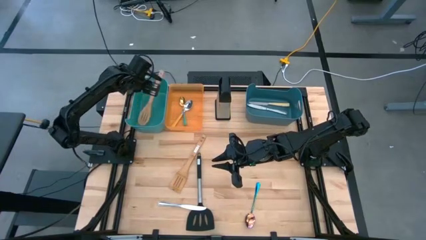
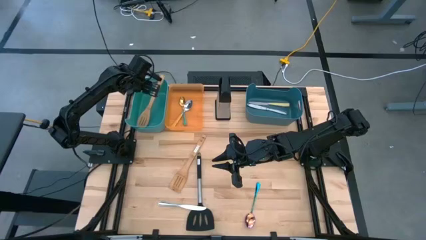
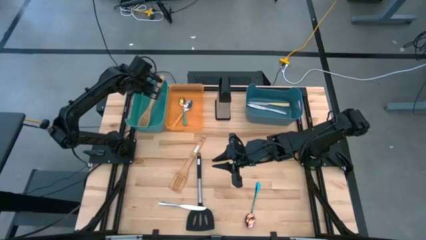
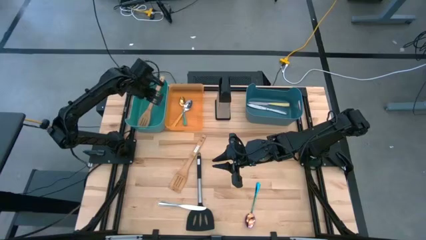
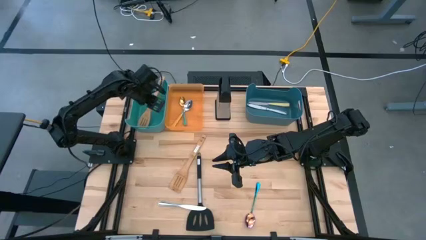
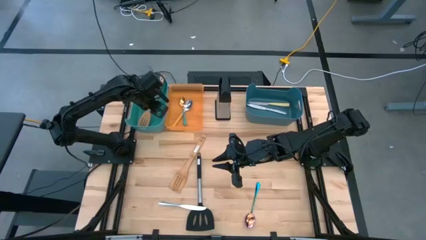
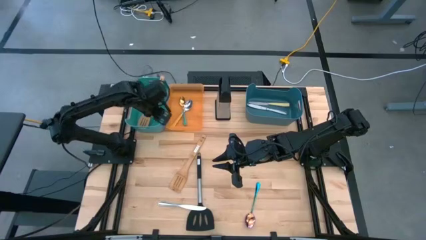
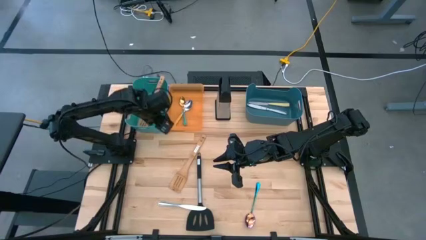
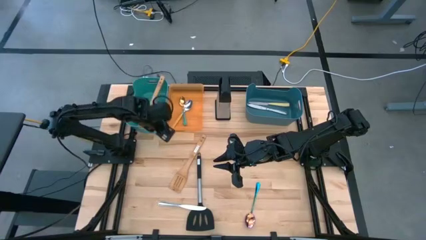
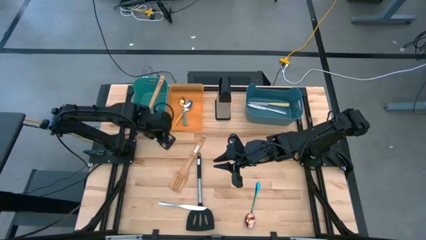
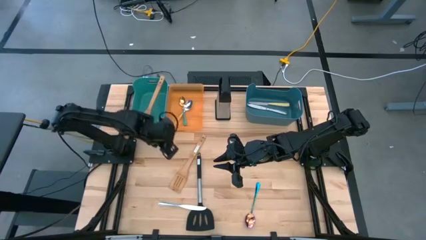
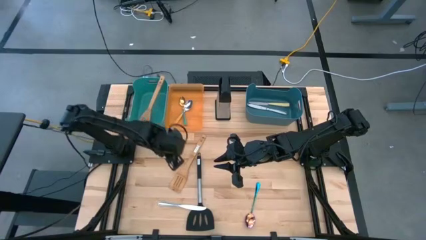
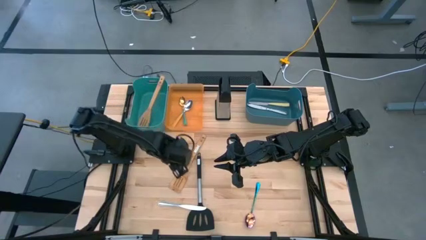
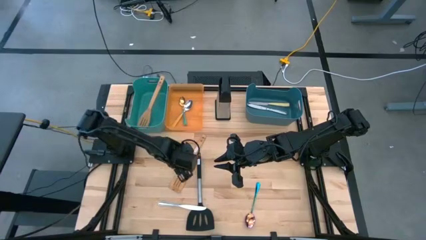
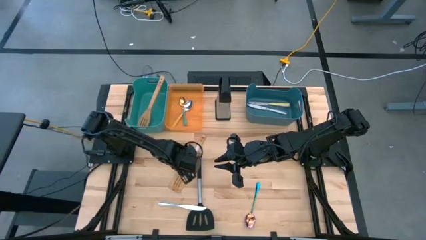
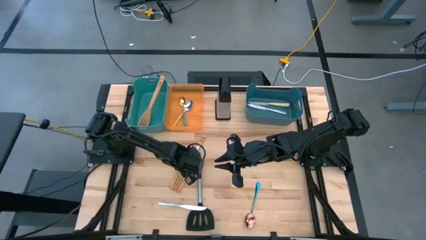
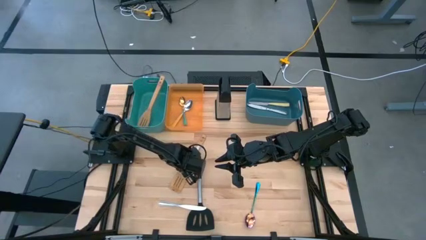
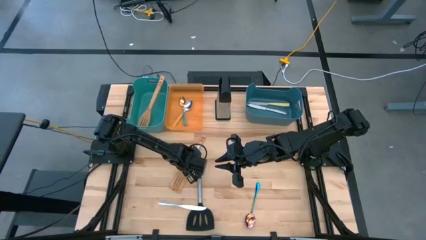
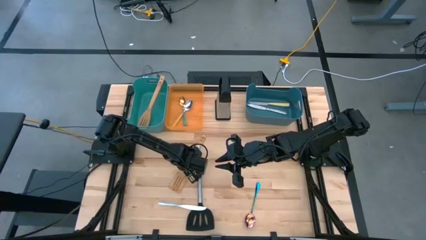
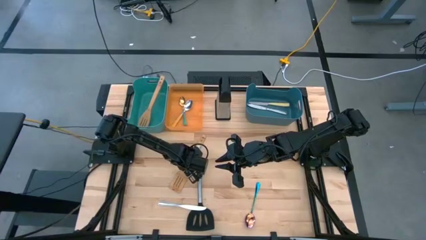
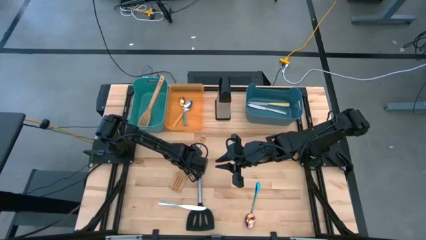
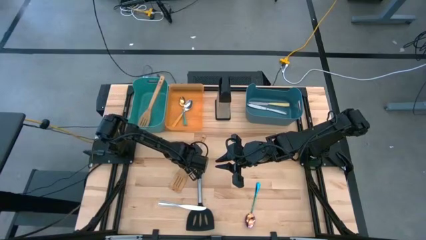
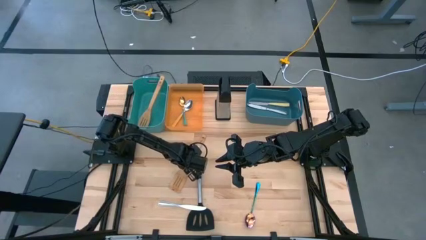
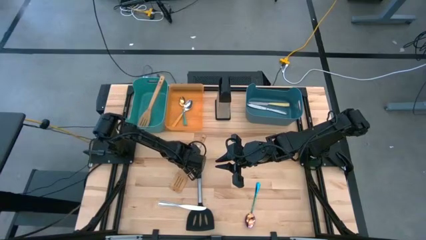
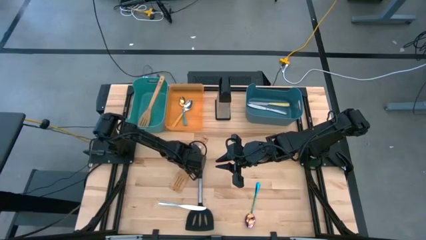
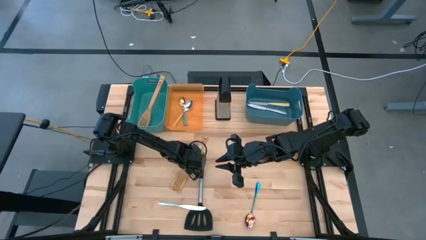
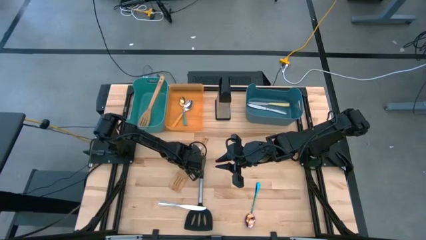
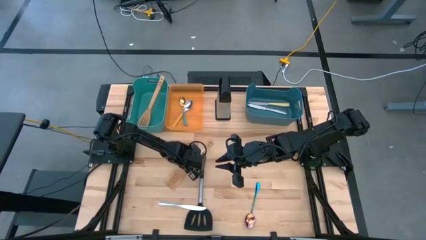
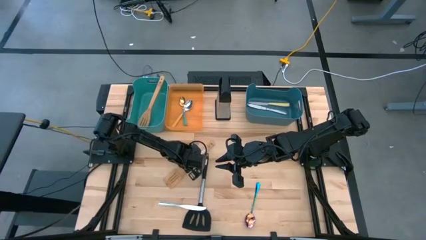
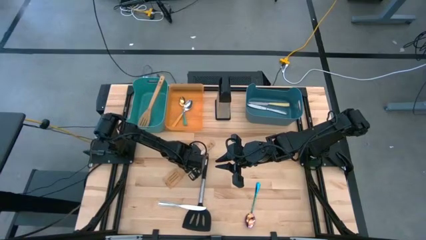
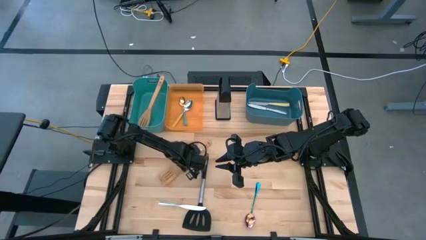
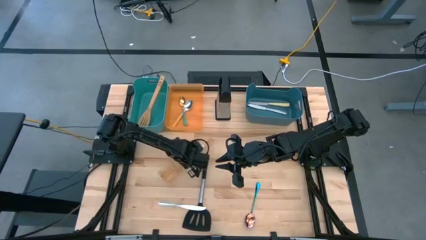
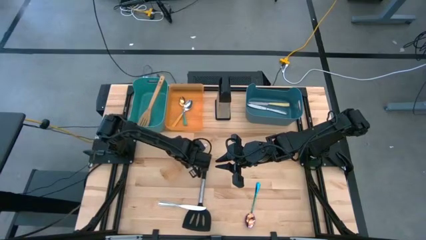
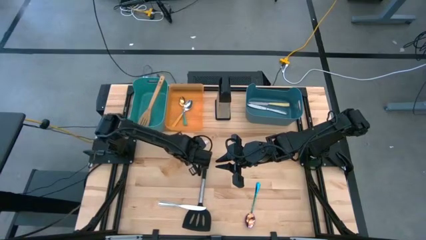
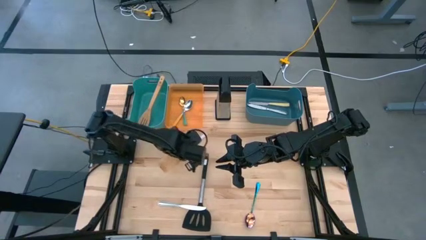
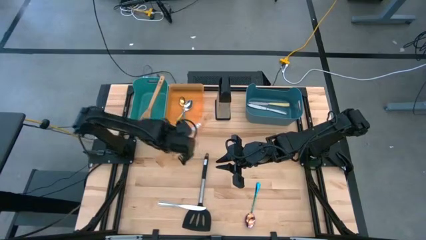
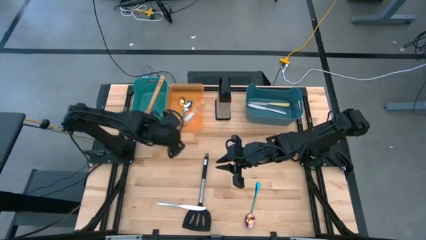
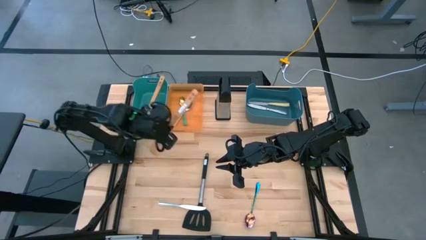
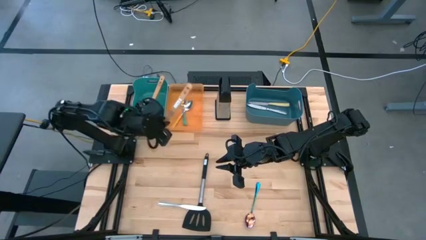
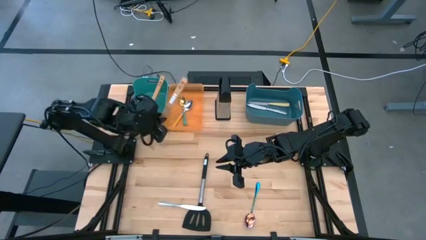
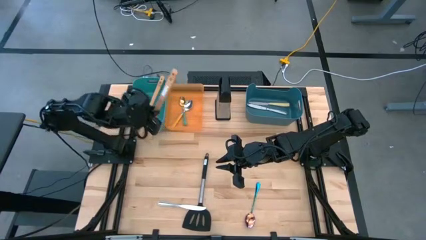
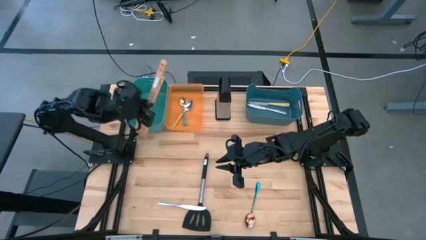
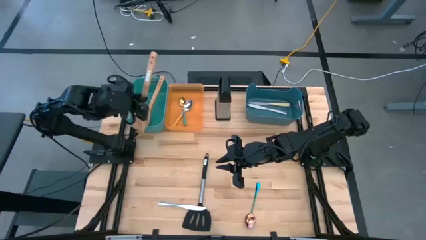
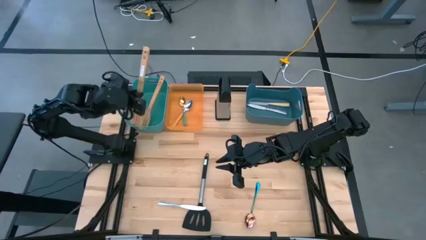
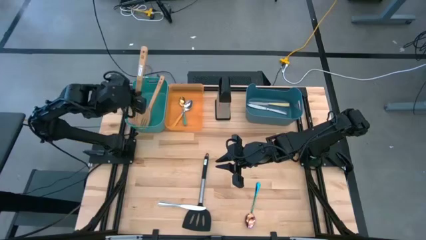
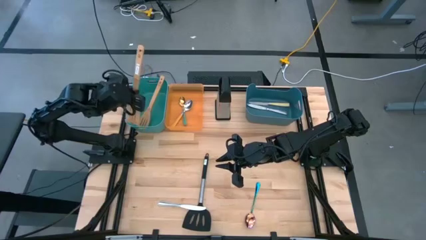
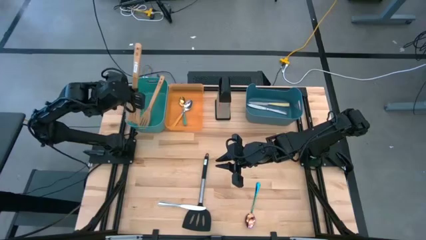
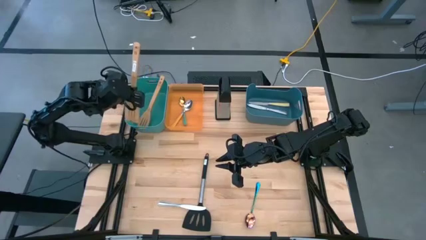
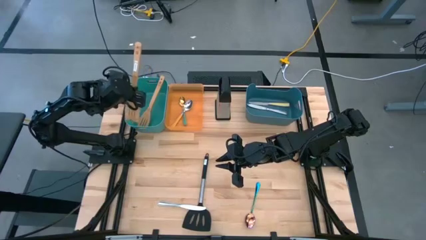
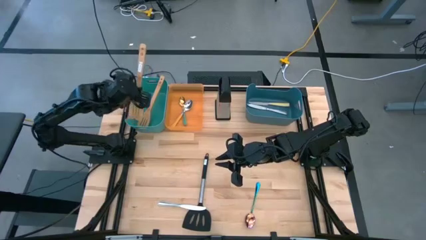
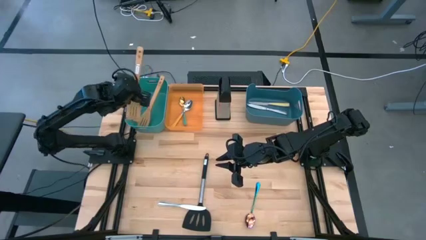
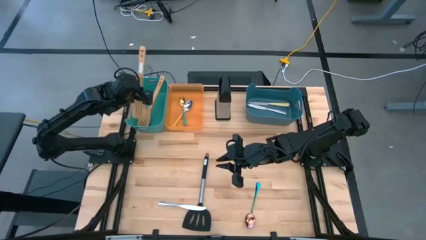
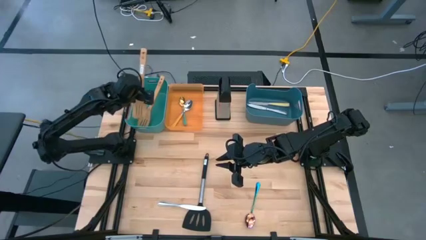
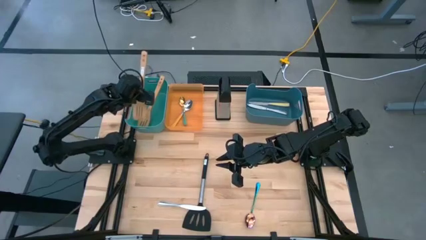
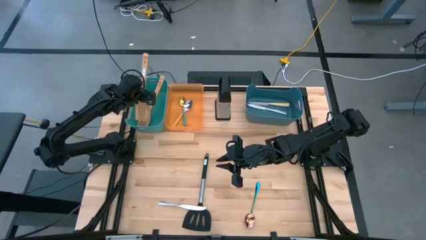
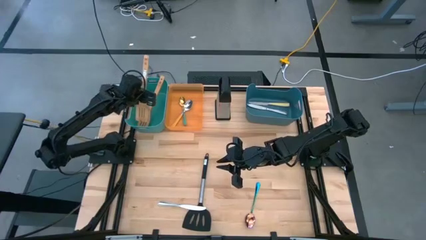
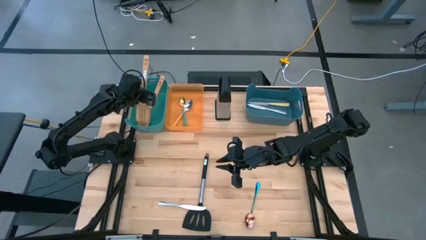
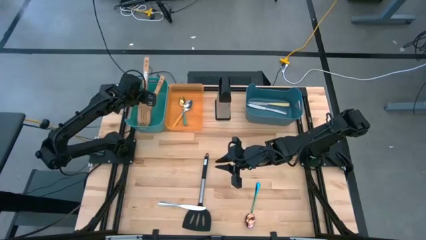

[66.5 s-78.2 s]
Task: Pick & Place Kitchen Items
Put the brown spatula into the green bin

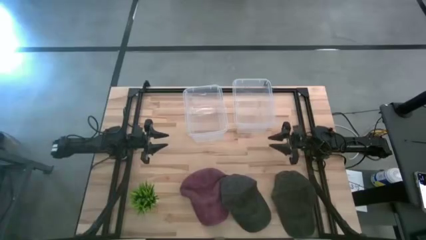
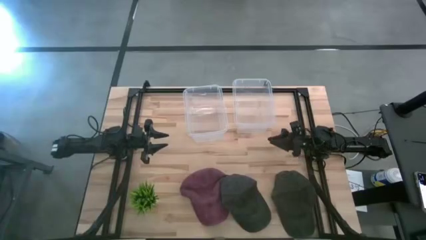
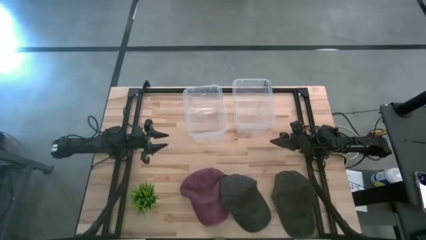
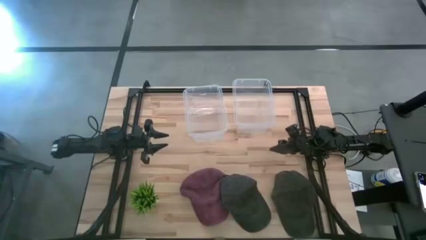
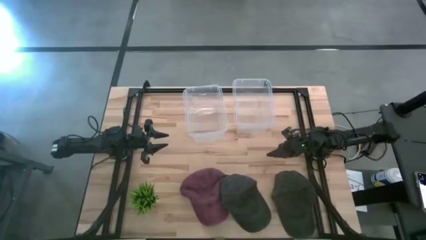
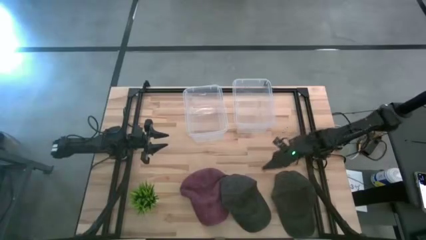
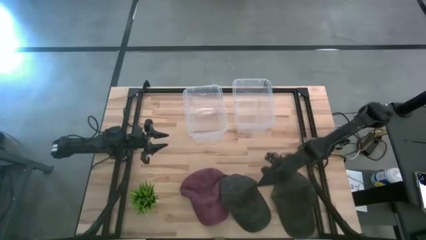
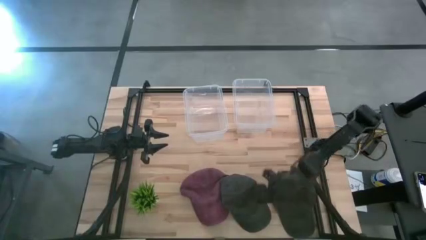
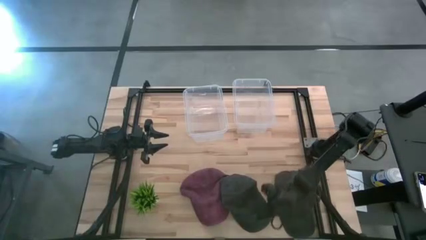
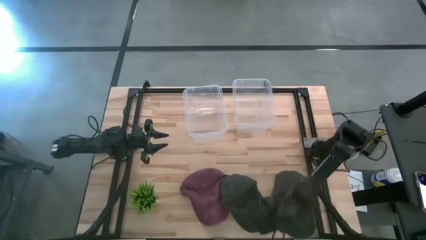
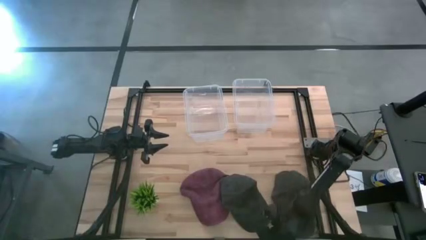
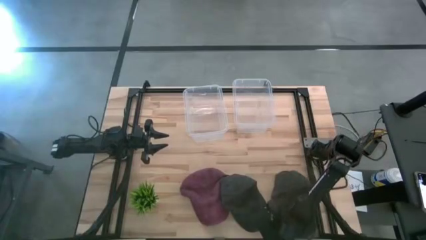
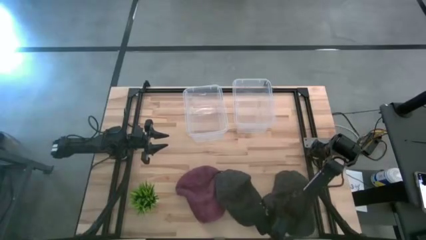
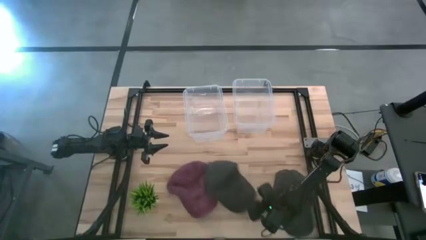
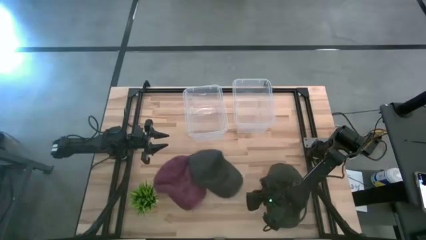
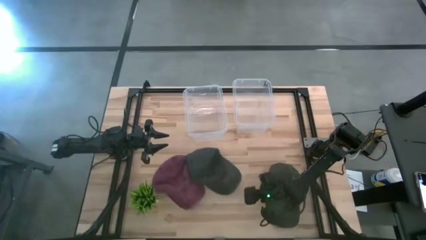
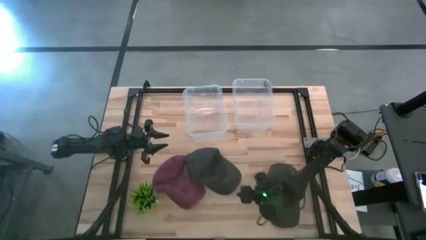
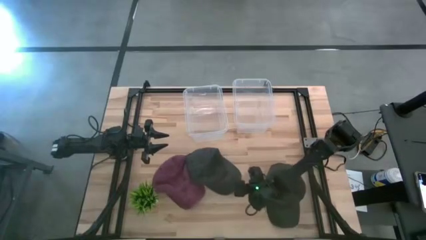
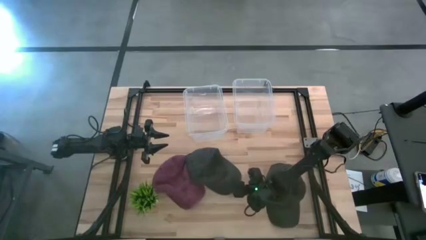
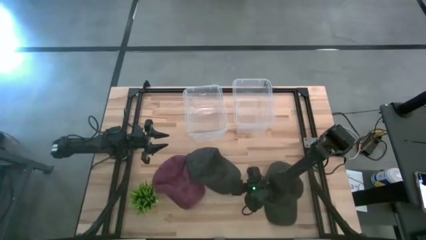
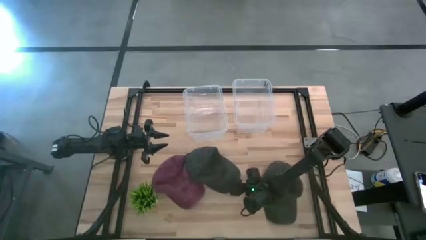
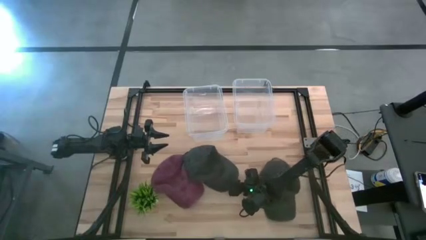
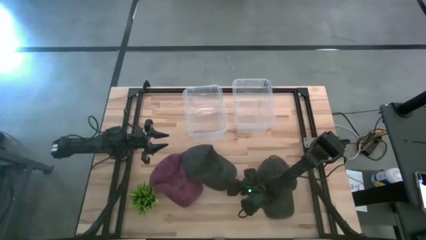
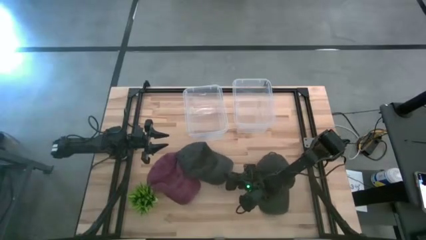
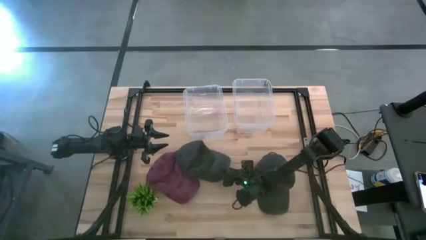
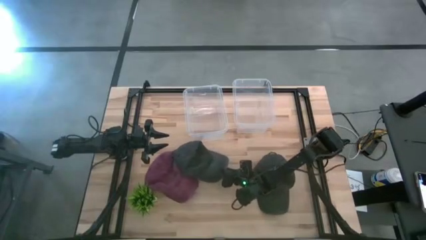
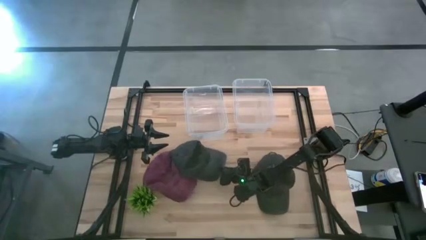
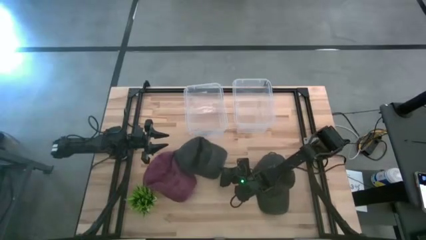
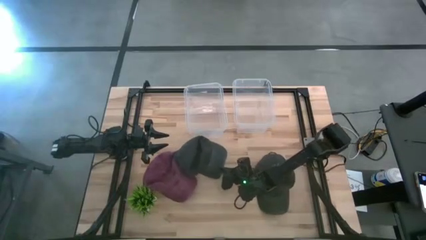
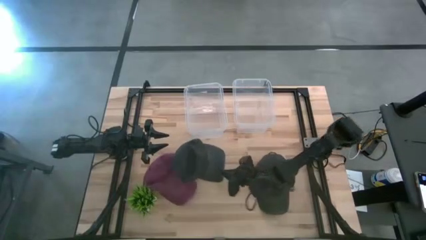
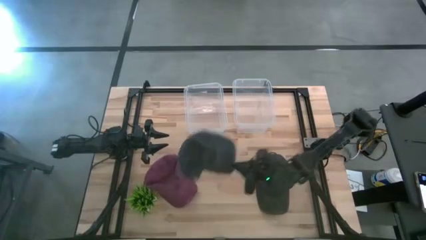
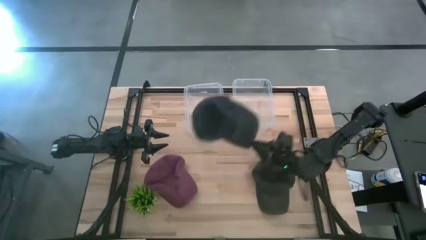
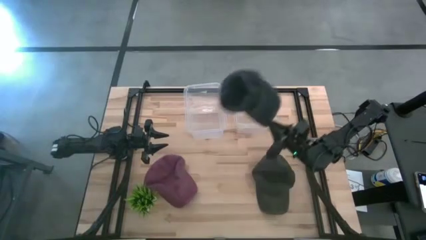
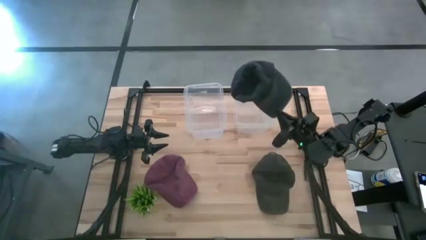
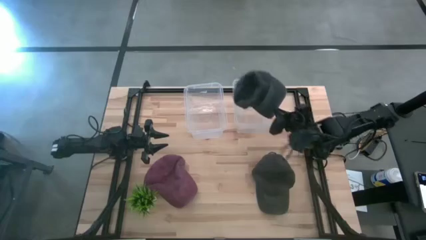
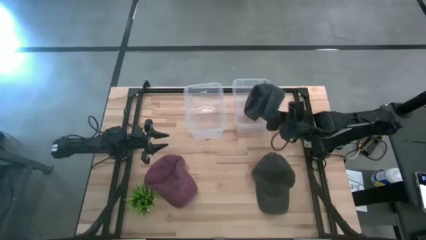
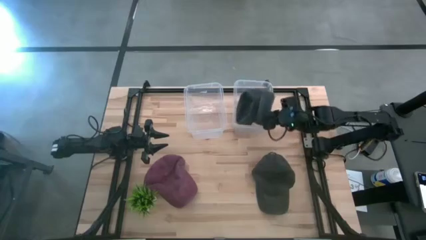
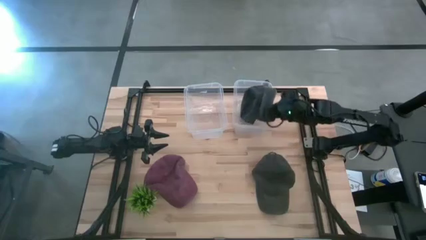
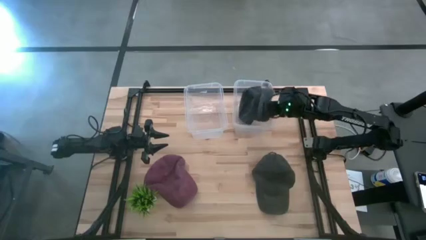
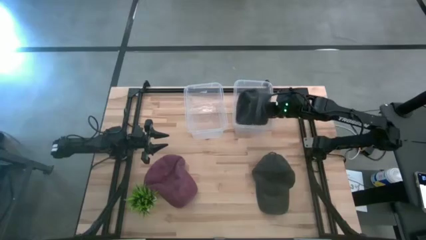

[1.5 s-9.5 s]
Task: Pick & Place hat
Put the left black cap into the right transparent bin
